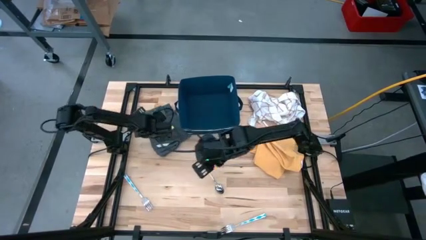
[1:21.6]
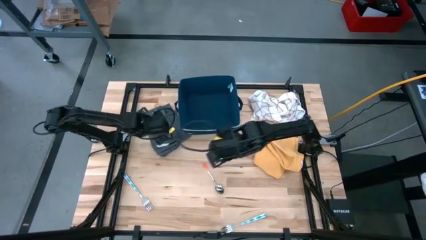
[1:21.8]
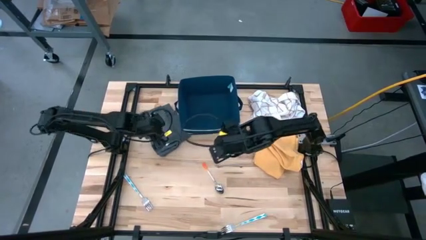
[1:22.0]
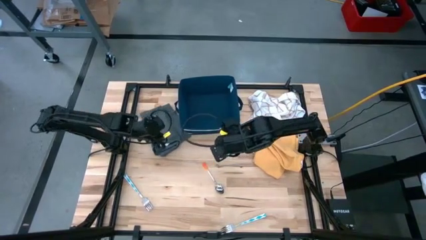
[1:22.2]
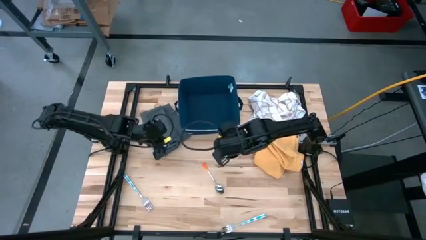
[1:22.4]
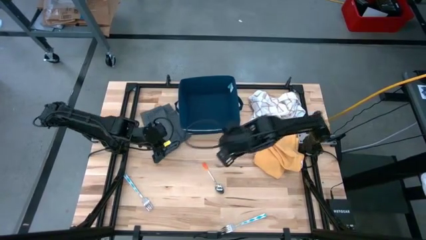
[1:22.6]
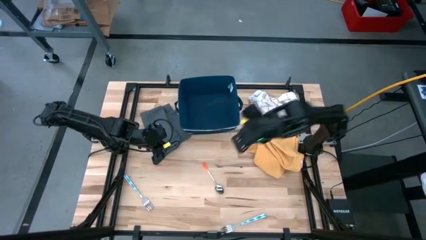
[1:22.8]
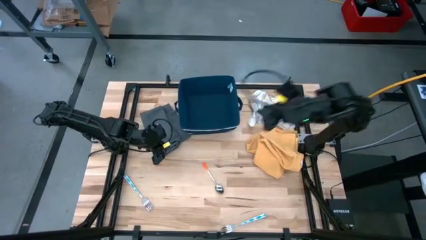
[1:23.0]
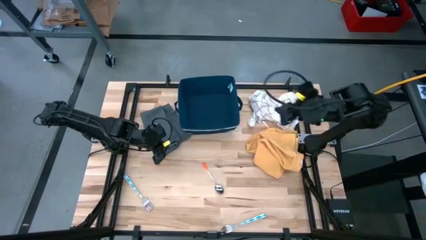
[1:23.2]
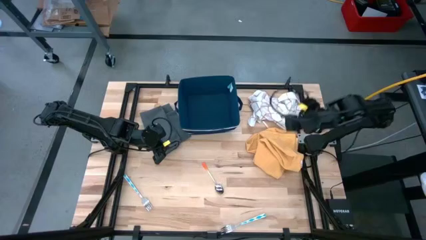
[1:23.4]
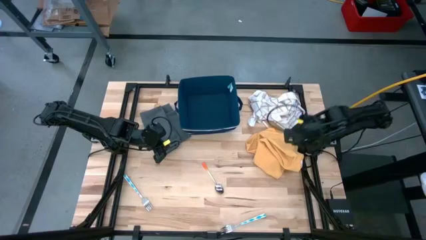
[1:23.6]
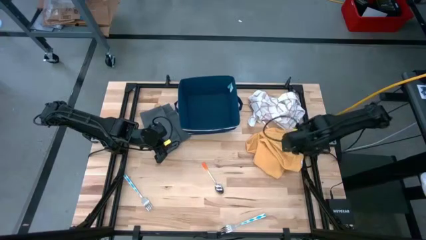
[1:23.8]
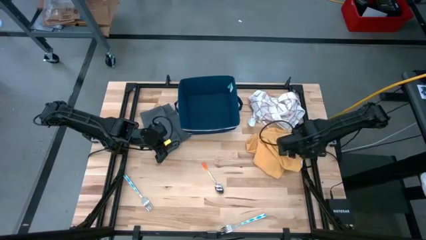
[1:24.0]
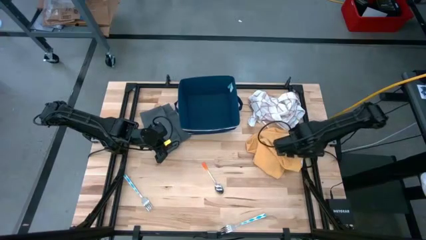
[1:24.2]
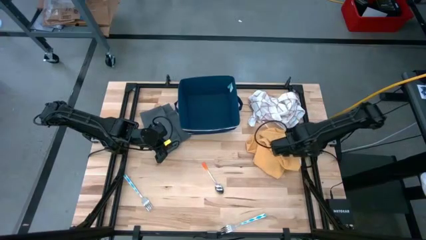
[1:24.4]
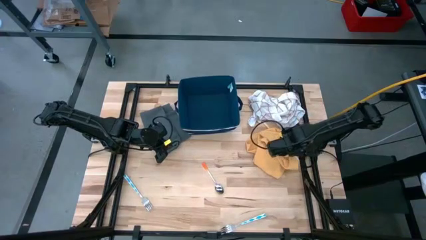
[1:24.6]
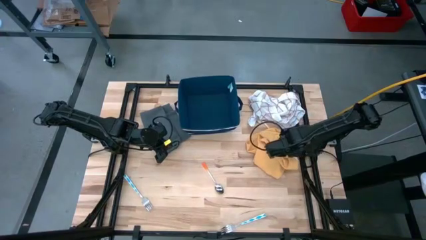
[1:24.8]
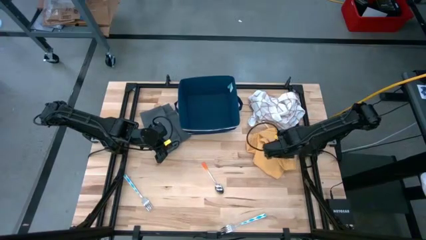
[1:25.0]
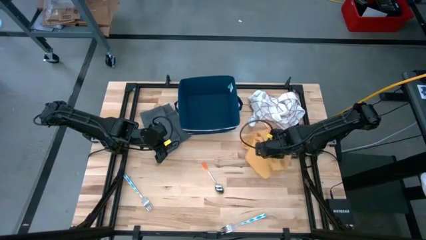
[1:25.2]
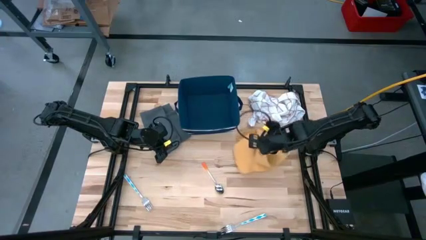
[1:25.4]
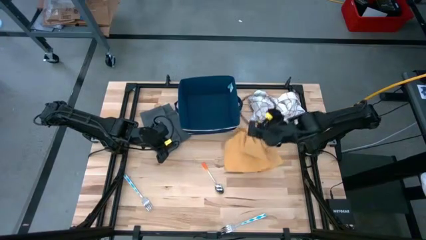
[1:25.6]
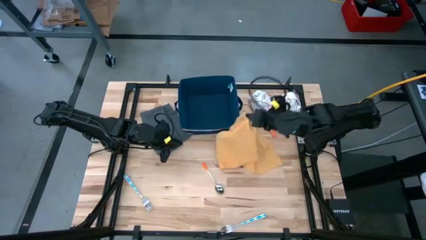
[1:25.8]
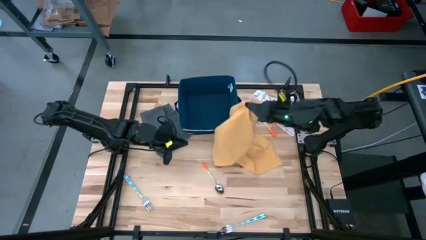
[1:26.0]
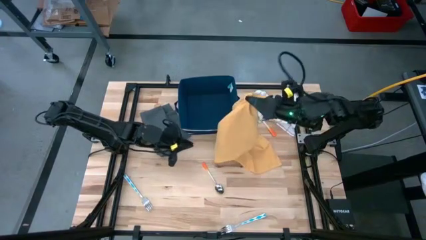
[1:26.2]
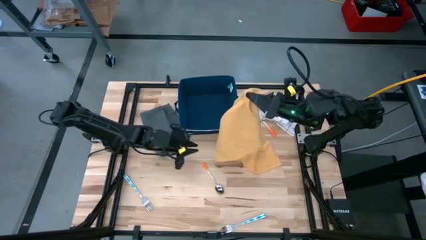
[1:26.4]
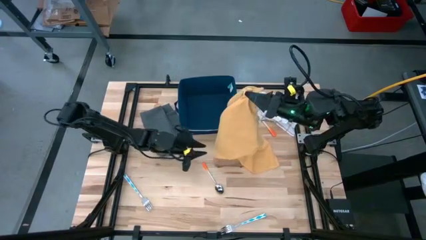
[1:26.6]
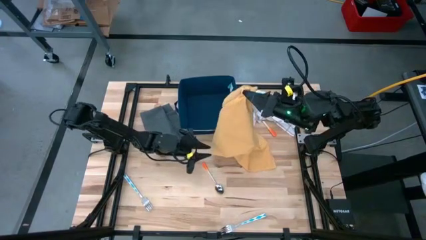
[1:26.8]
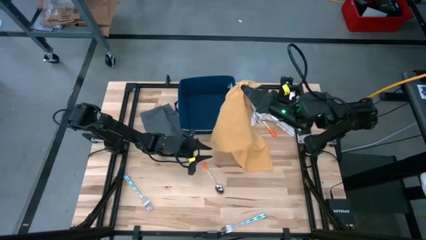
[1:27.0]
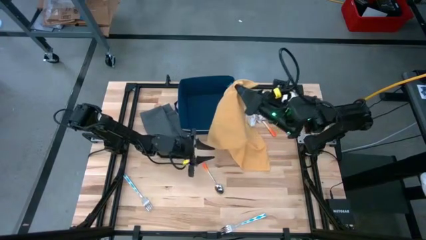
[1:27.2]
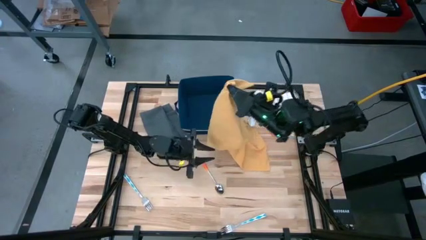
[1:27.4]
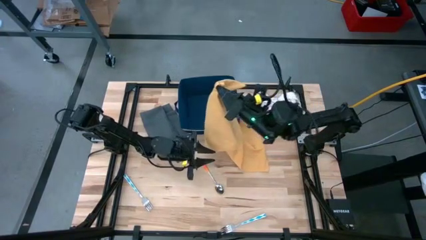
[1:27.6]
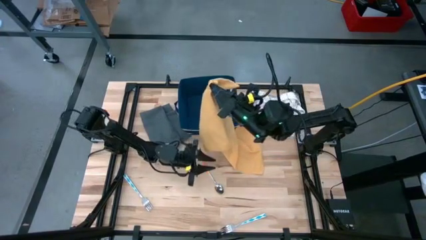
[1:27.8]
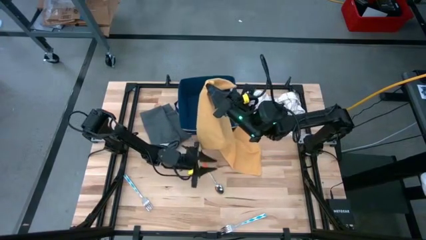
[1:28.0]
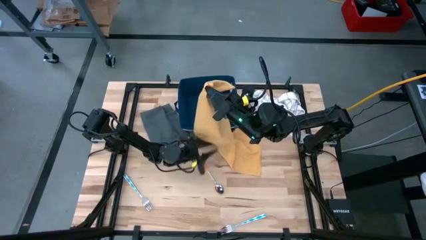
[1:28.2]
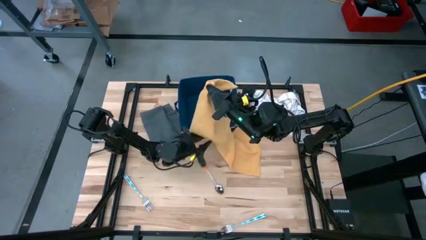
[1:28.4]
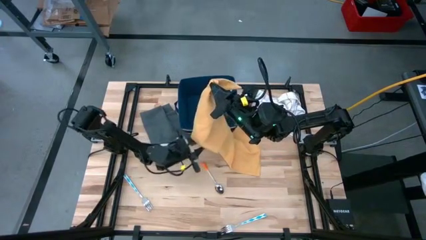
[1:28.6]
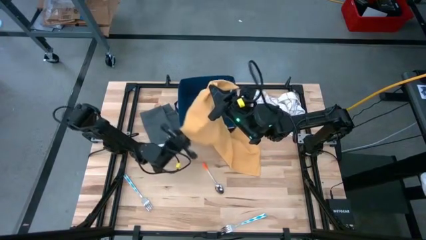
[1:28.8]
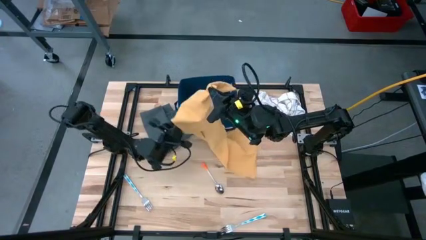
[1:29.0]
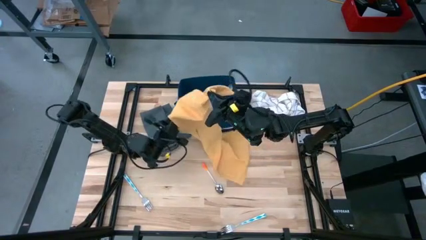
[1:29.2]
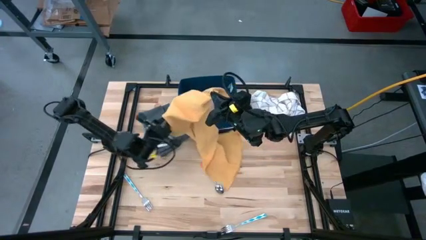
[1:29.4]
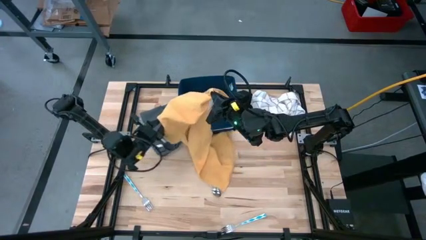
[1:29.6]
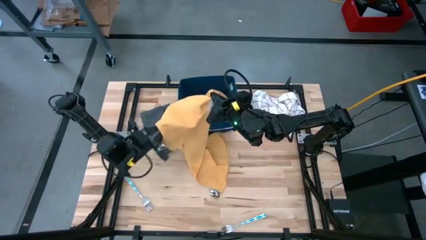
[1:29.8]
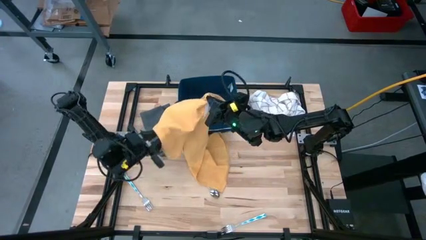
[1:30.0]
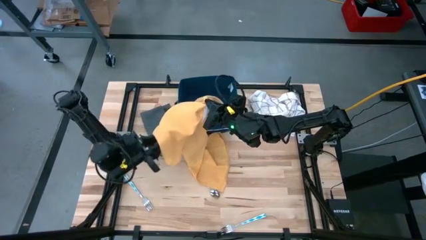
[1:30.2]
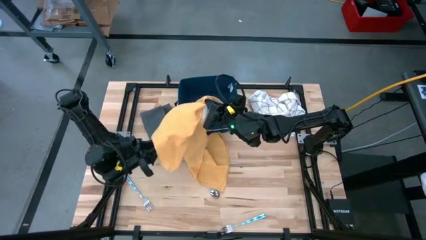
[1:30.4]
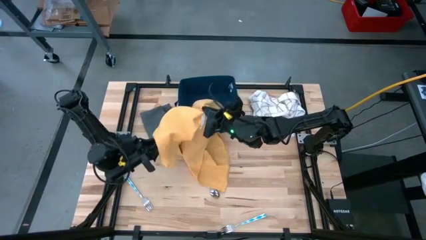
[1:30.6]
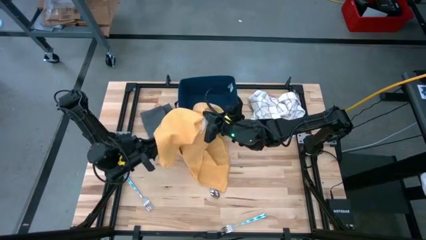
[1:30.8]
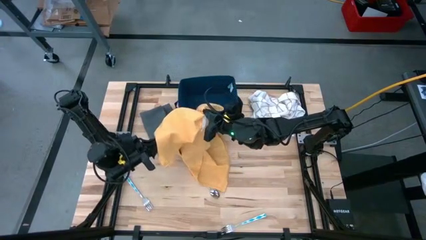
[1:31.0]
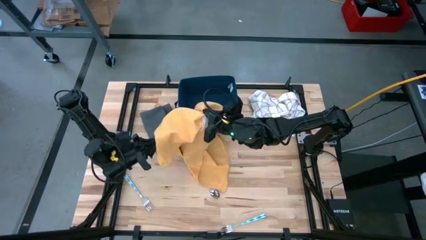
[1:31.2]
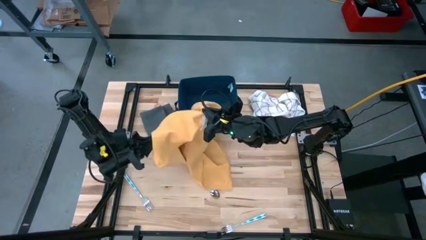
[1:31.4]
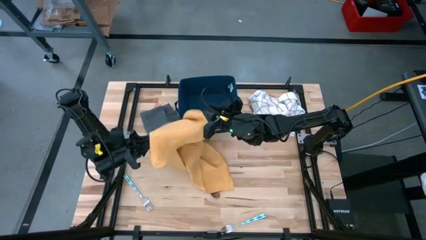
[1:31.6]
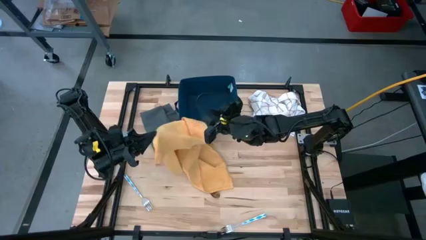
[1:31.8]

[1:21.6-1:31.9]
Task: Fold towel
Fold the yellow towel

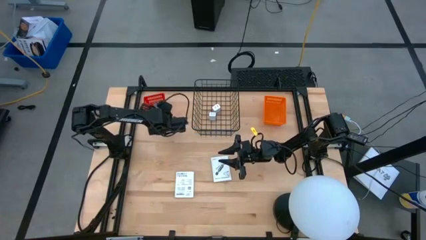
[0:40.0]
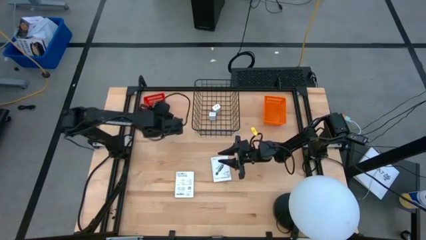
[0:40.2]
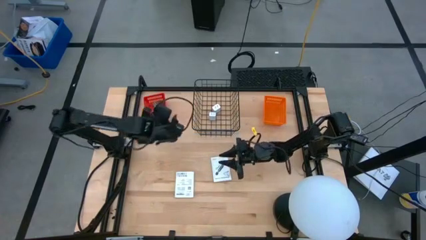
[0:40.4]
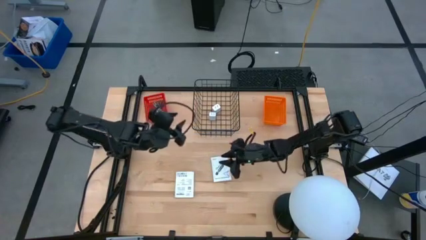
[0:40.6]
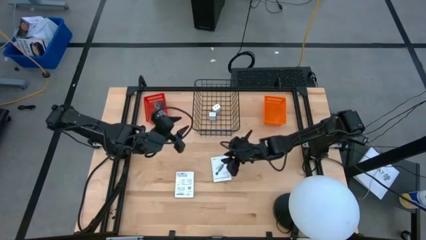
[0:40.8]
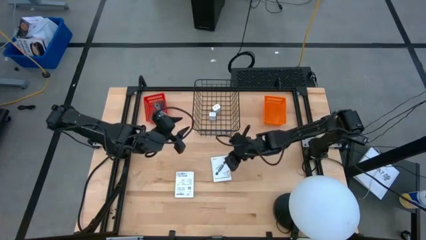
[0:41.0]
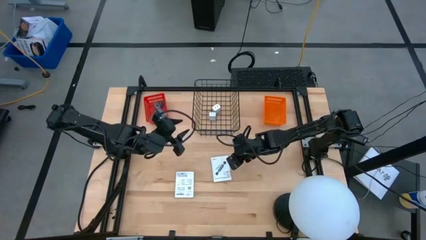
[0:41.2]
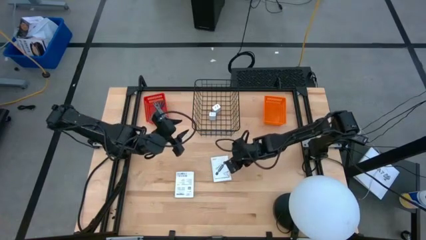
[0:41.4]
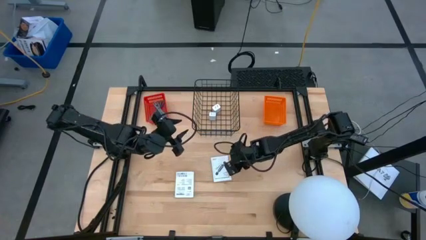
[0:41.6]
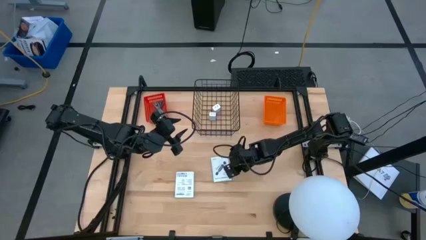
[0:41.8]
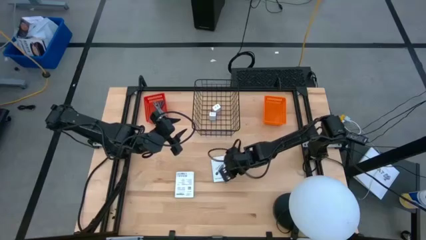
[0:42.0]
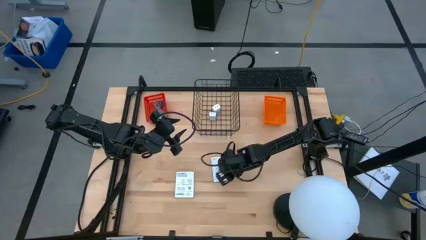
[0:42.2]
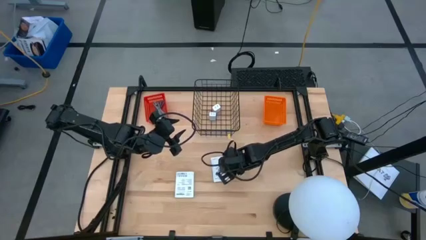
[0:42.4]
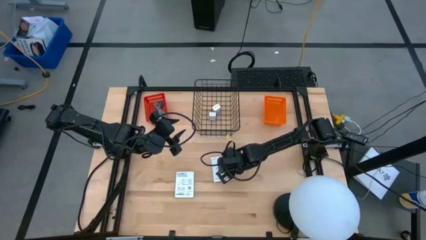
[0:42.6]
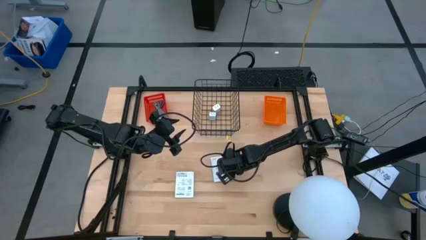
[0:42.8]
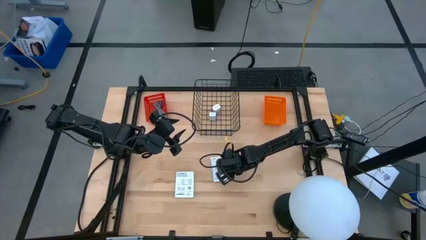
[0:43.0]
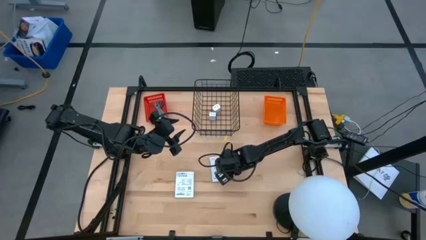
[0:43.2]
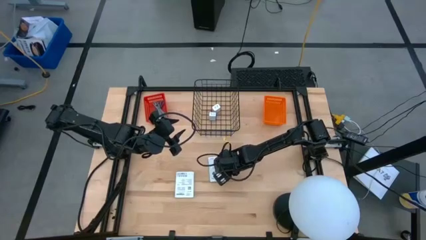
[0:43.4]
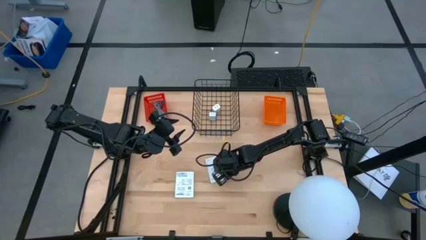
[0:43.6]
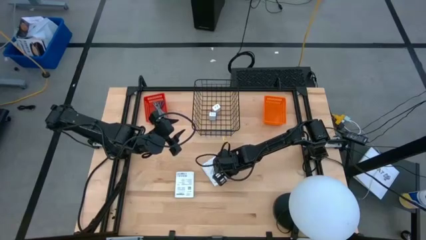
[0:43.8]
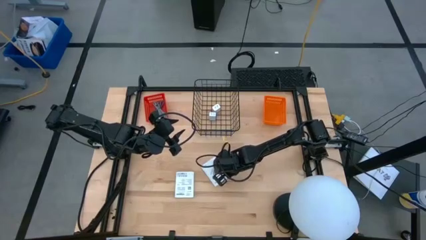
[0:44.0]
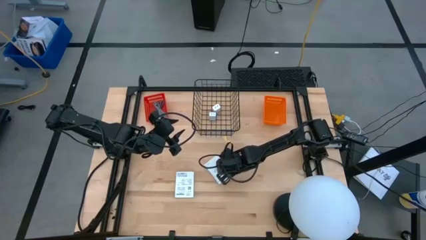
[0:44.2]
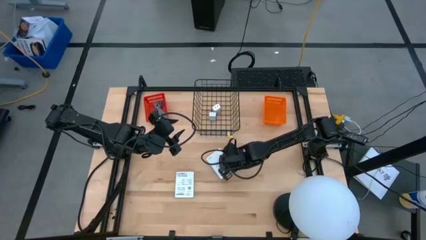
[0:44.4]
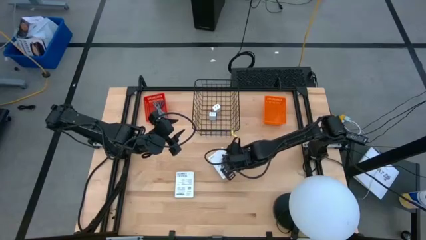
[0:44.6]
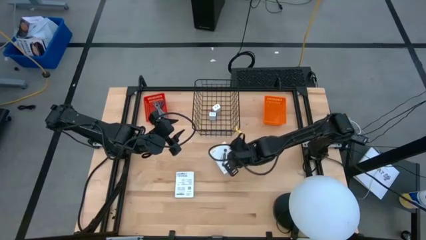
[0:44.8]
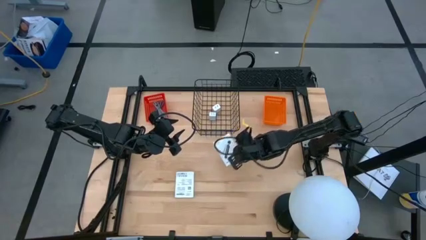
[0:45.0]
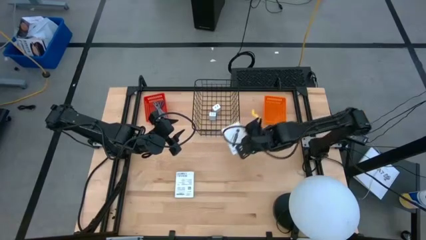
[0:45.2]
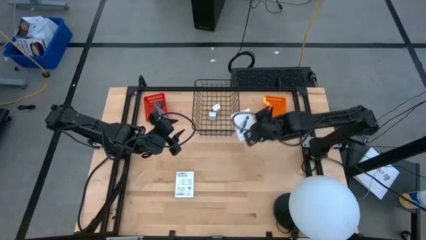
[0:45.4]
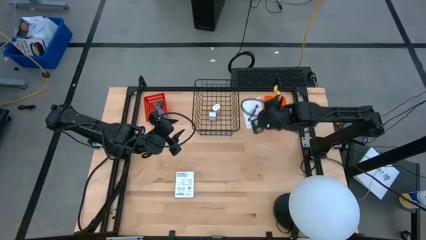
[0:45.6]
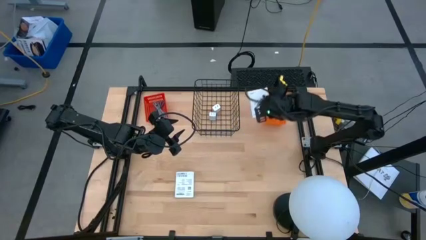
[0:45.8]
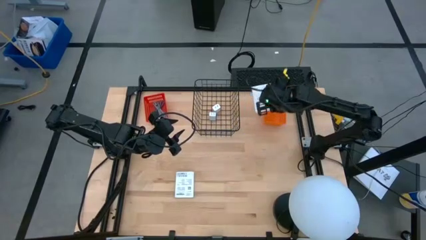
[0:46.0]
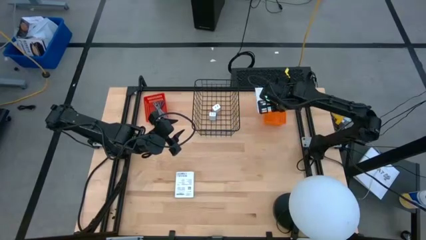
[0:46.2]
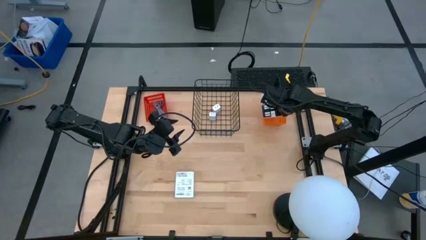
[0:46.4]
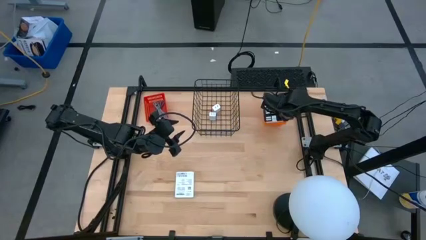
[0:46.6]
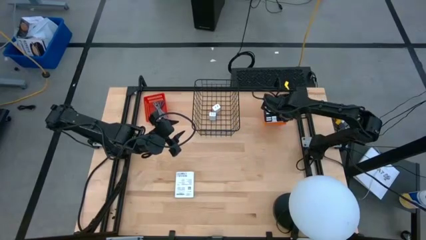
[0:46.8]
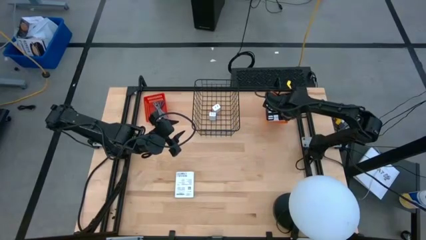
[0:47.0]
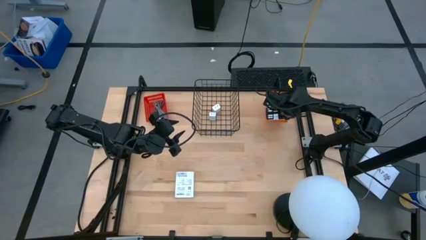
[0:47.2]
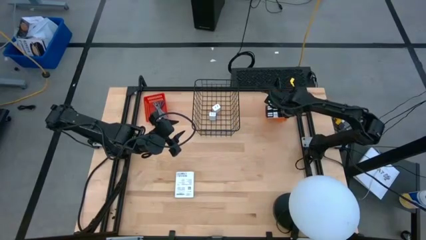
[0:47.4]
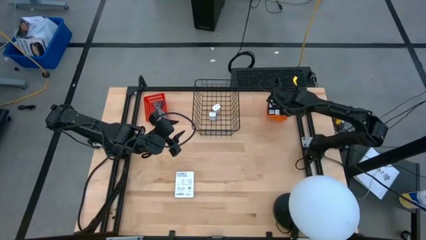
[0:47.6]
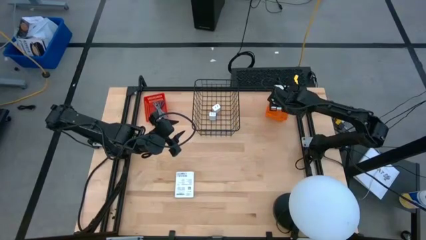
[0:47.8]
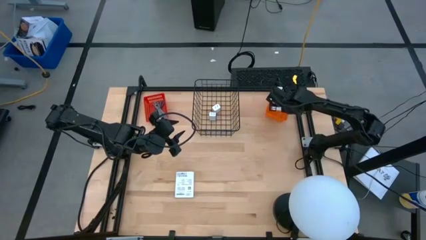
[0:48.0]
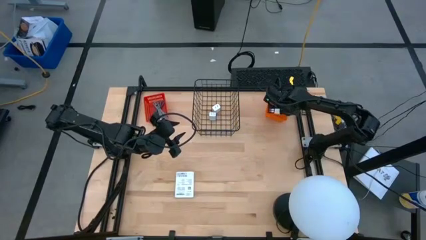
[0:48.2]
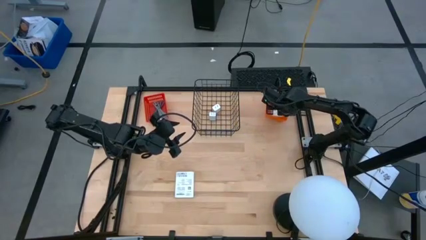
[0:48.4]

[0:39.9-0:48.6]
Task: Pick and place items into bin
Put the right card reader box into the orange basket
